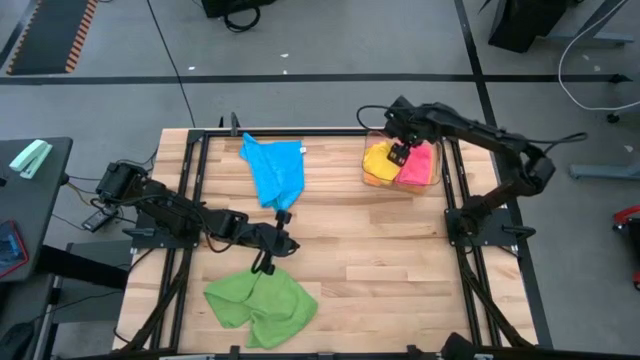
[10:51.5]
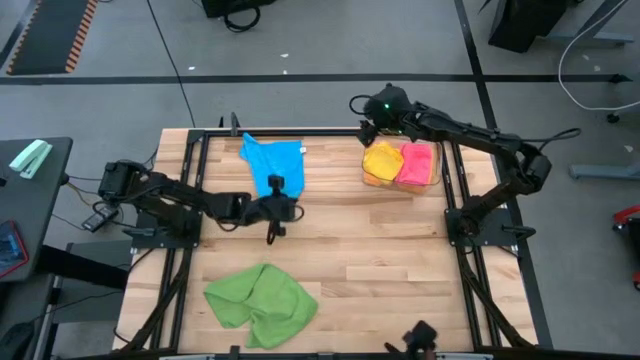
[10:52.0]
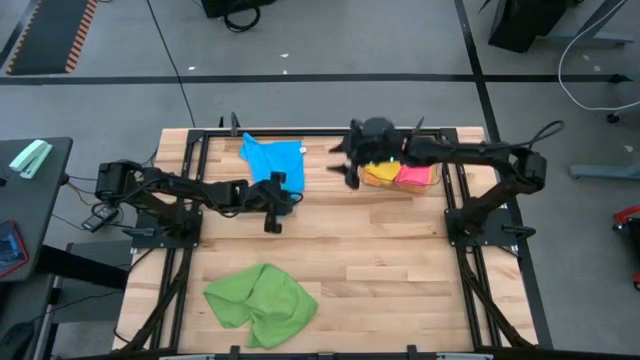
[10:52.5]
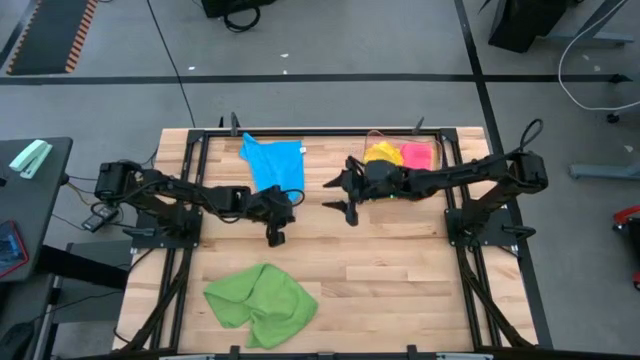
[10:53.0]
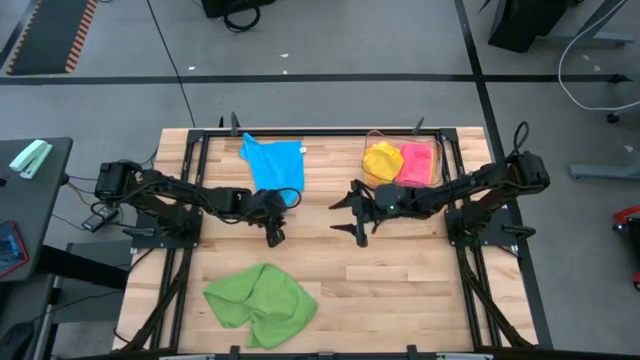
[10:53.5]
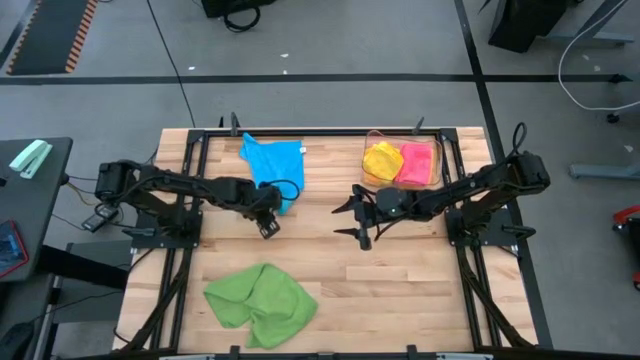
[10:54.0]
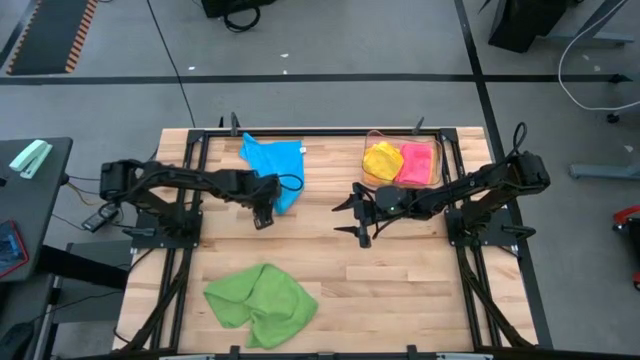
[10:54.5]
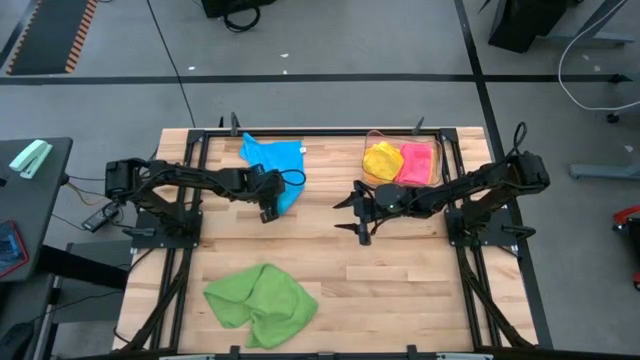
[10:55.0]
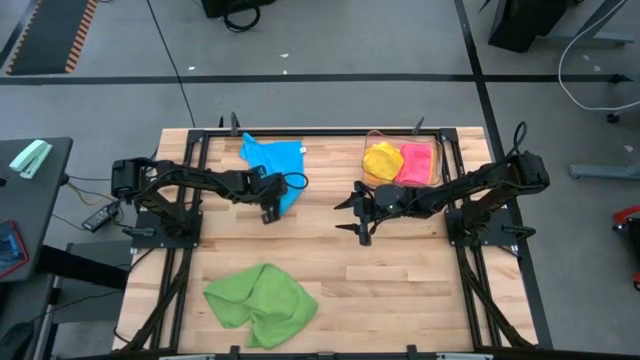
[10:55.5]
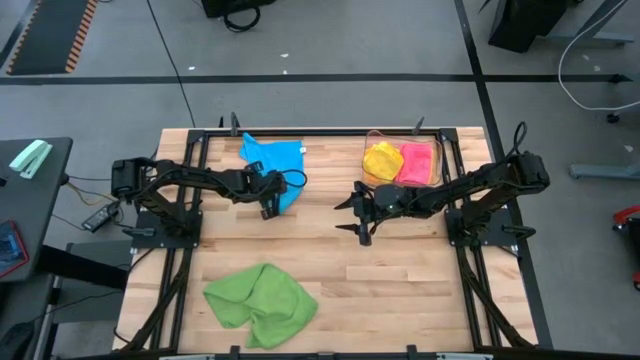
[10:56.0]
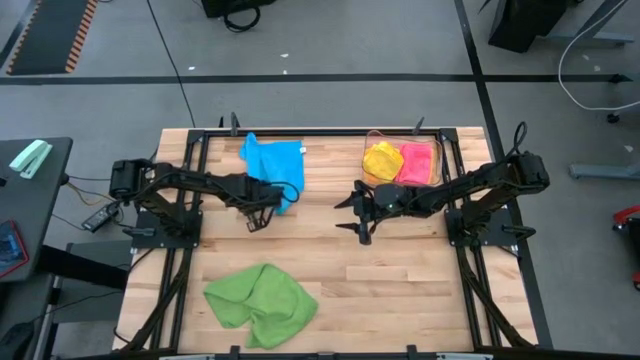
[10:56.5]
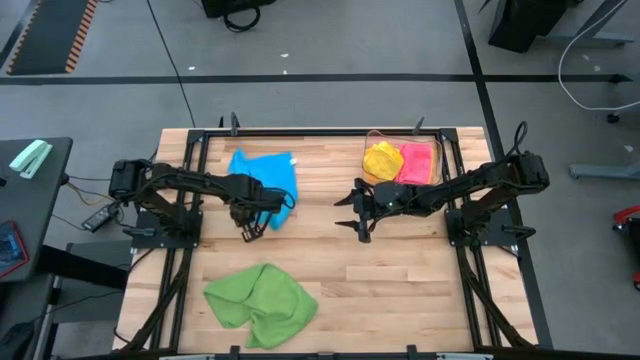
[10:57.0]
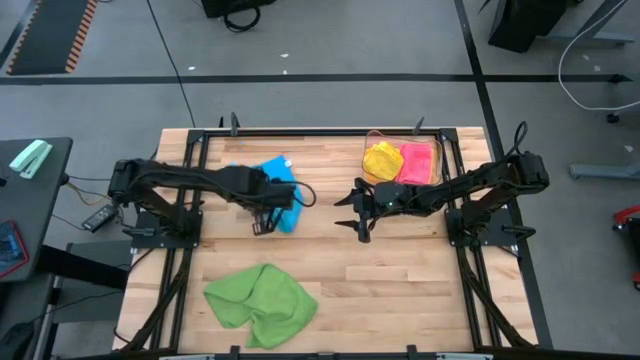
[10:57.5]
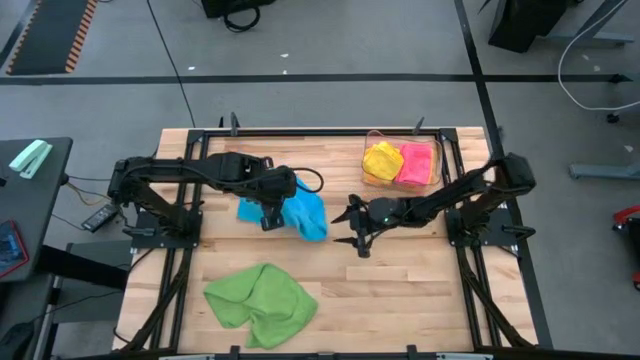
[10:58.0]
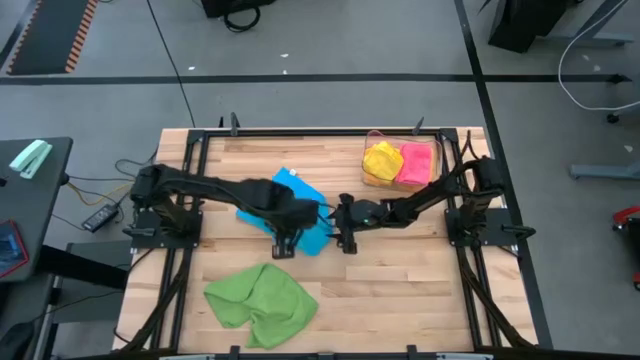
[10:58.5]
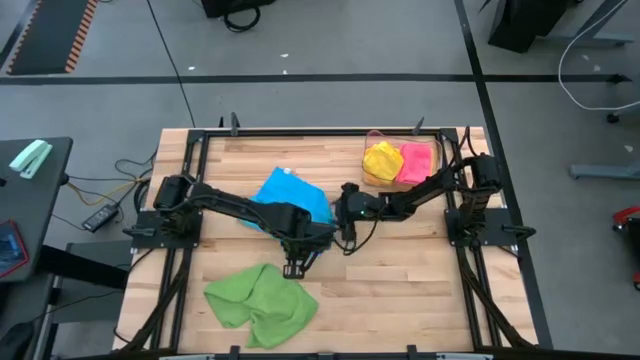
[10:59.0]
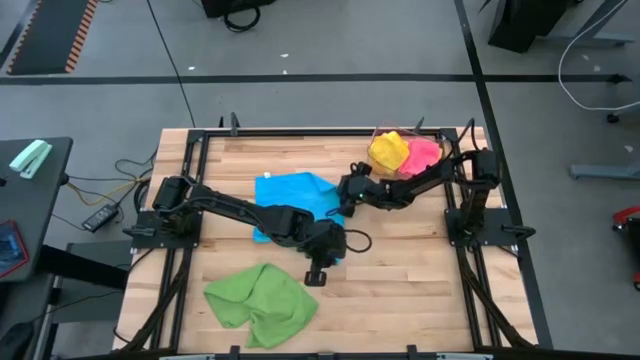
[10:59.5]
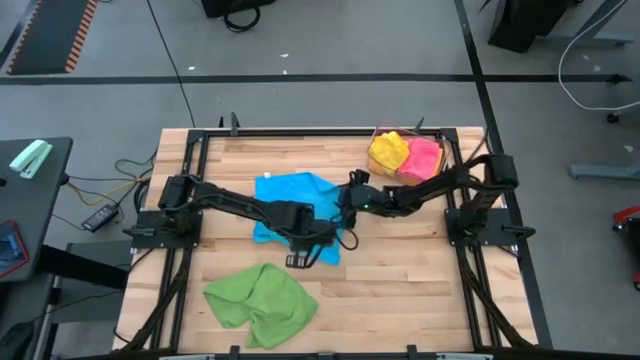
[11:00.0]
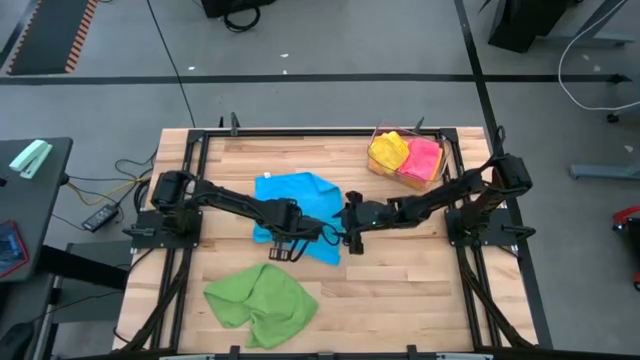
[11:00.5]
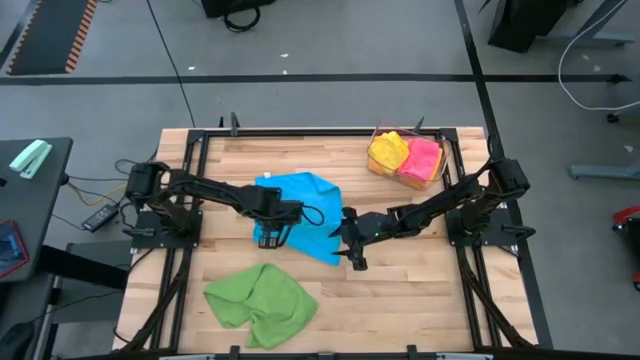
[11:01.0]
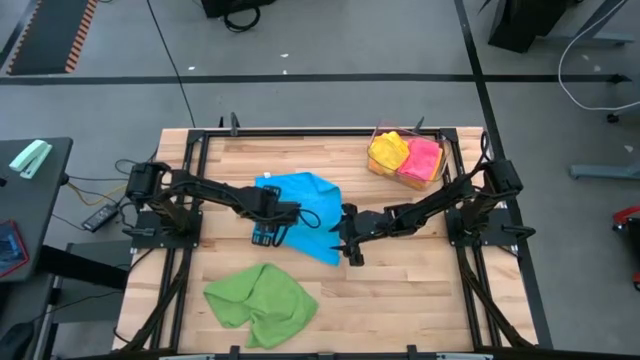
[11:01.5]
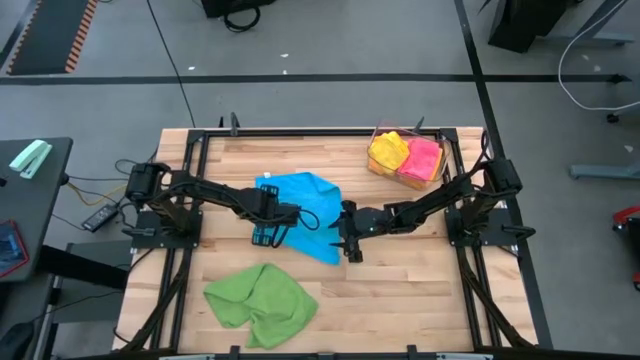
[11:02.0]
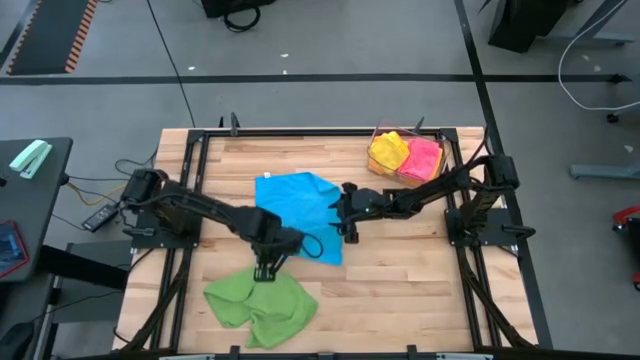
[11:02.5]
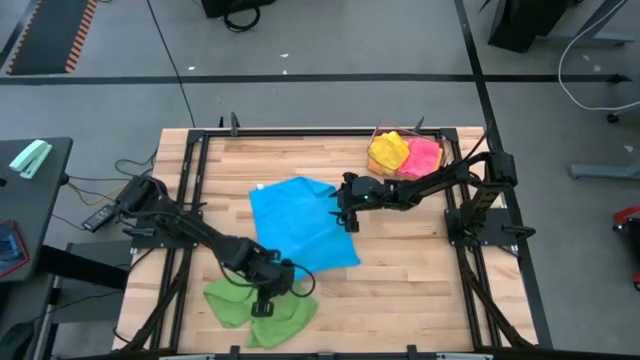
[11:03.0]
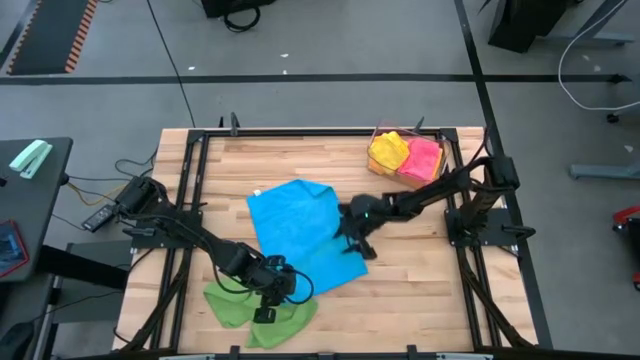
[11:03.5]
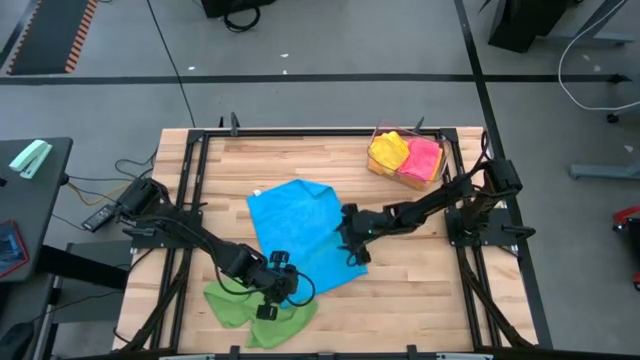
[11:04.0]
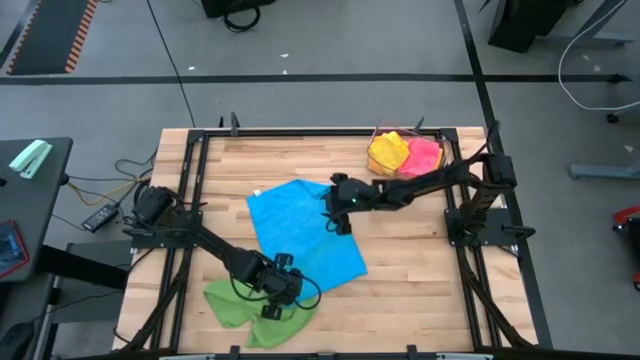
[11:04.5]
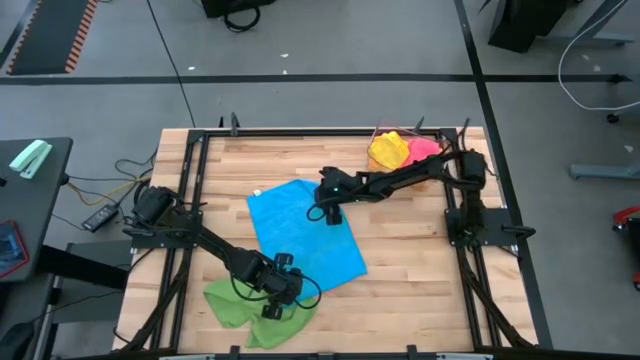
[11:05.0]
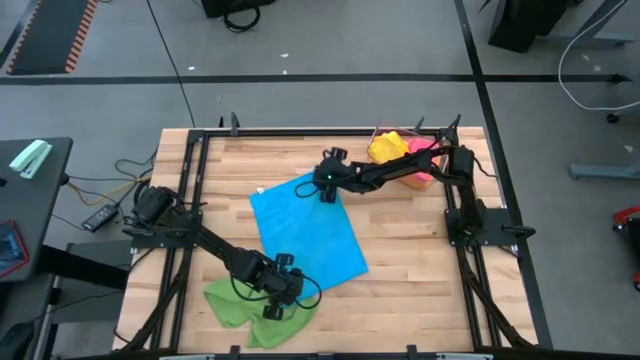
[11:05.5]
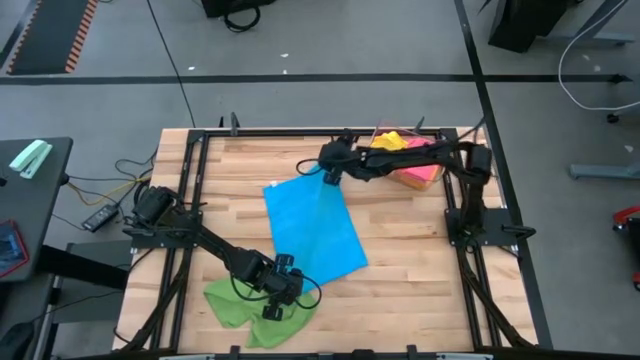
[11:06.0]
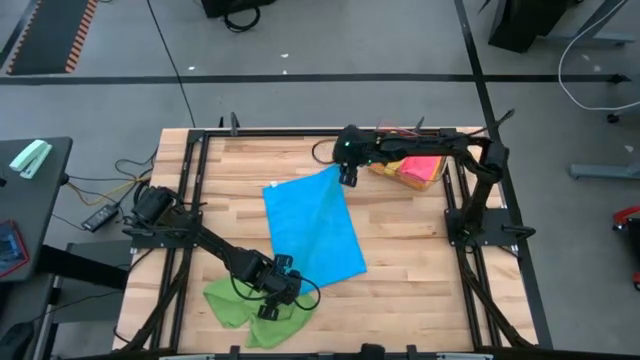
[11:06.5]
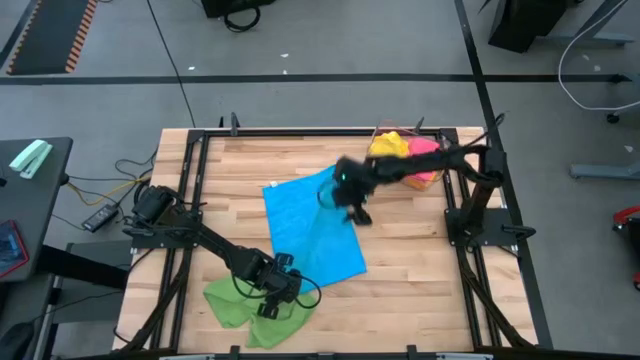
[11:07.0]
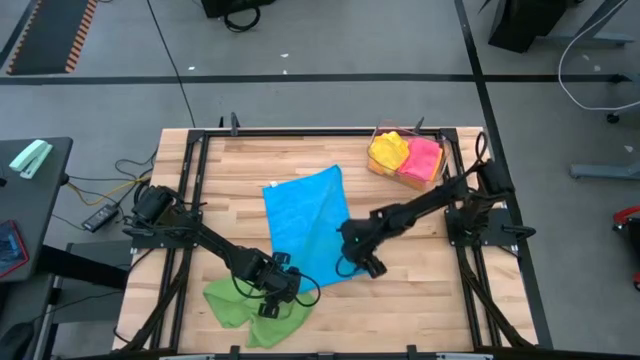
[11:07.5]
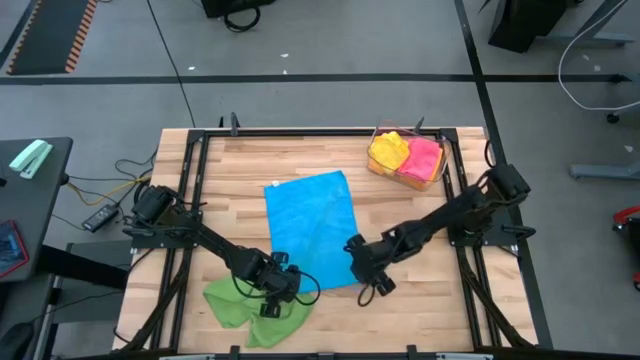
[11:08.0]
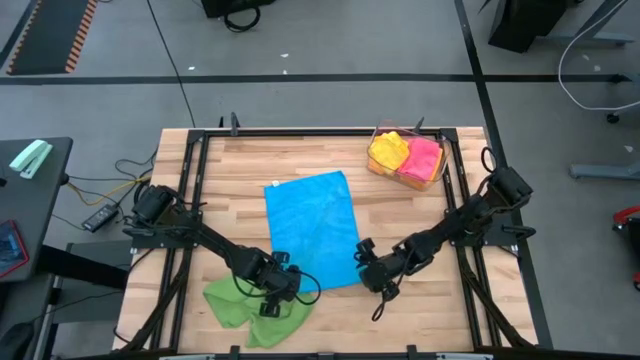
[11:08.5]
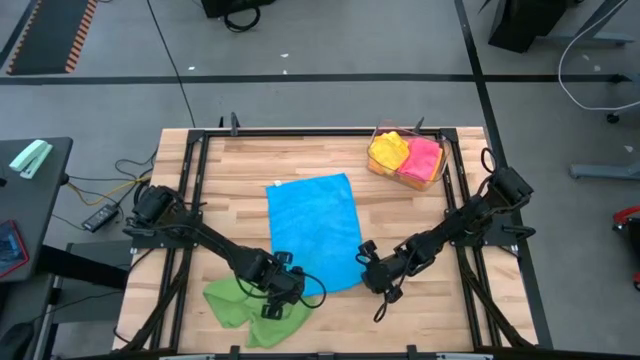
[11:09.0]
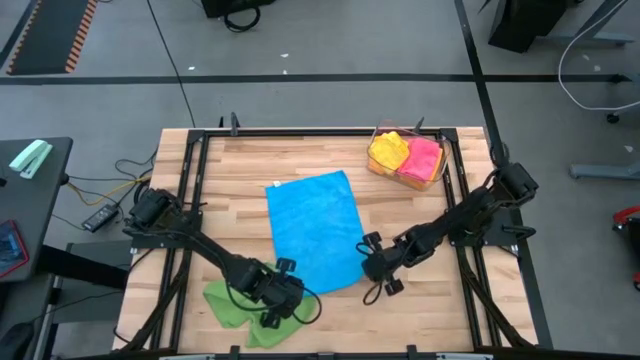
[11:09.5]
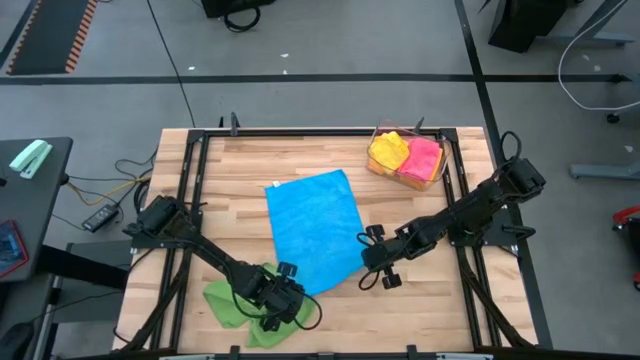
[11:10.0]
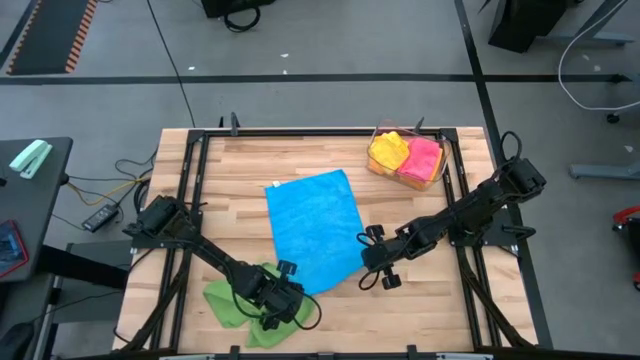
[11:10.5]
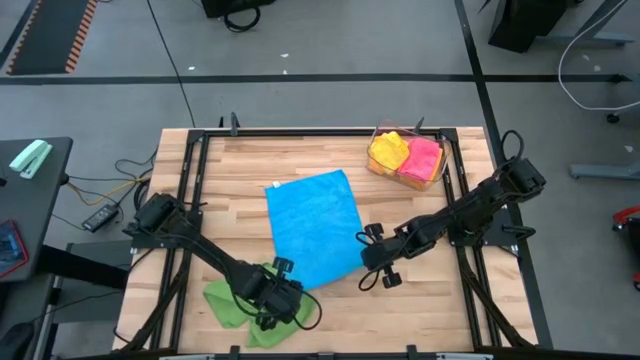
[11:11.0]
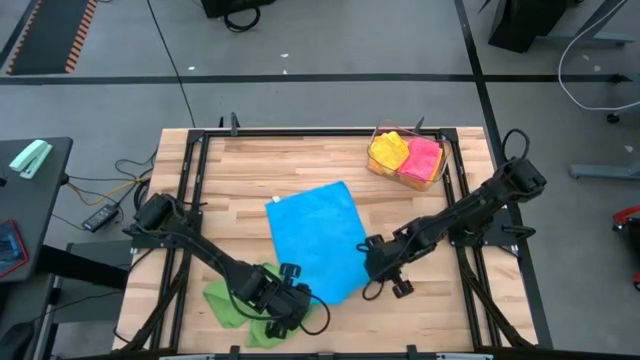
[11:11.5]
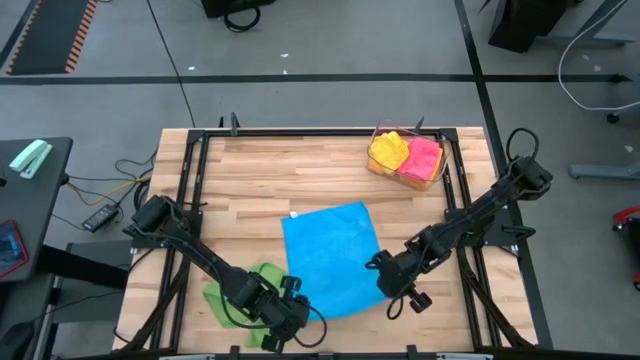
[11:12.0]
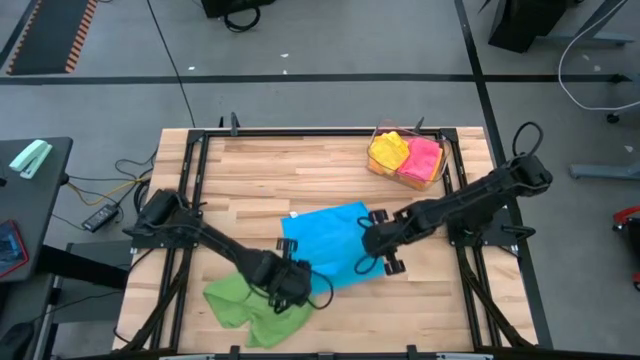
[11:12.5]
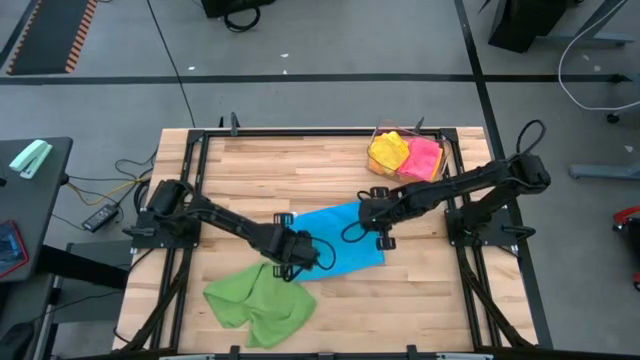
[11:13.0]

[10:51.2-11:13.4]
Task: Fold microfiber towels
Fold the blue microfiber cloth
